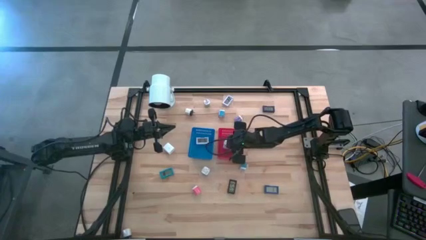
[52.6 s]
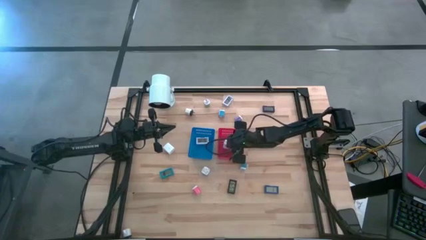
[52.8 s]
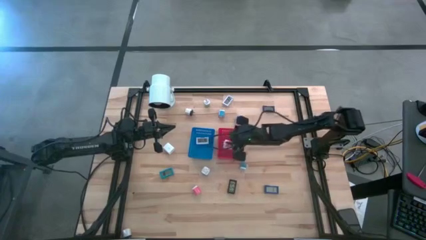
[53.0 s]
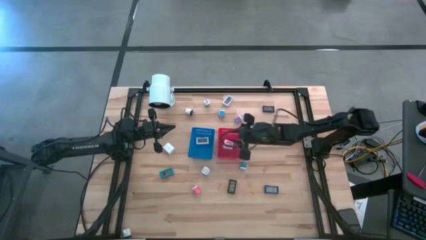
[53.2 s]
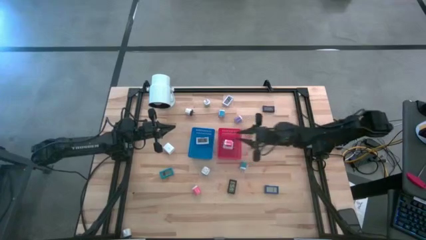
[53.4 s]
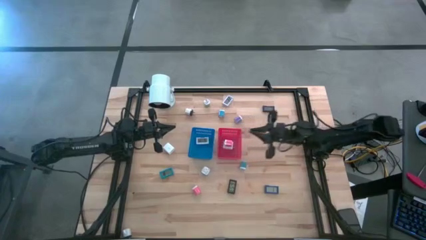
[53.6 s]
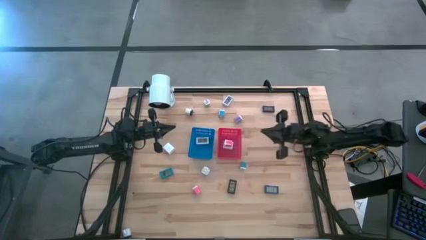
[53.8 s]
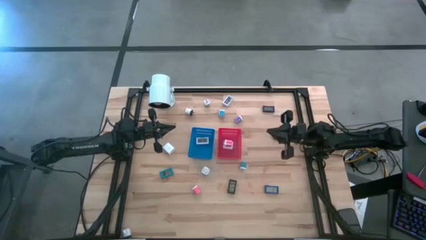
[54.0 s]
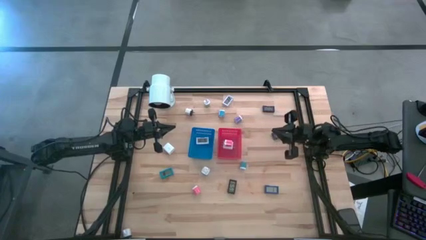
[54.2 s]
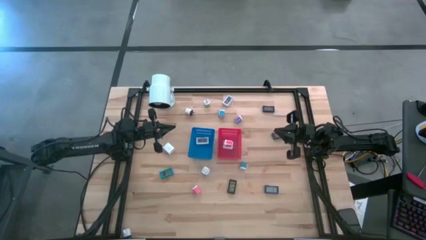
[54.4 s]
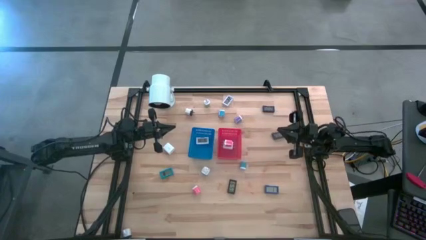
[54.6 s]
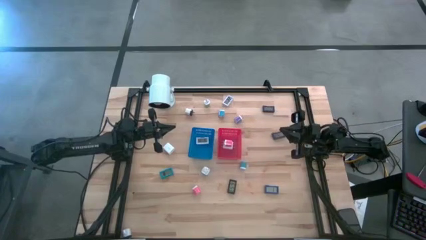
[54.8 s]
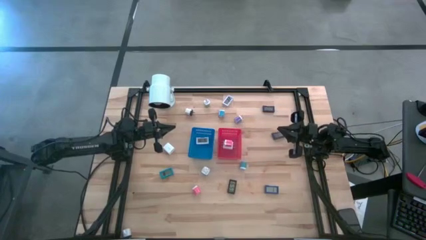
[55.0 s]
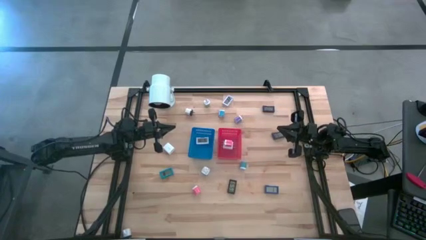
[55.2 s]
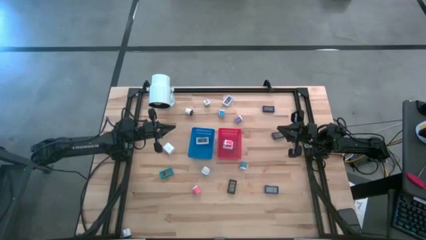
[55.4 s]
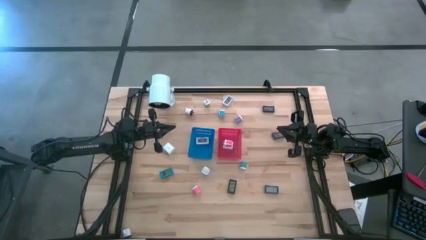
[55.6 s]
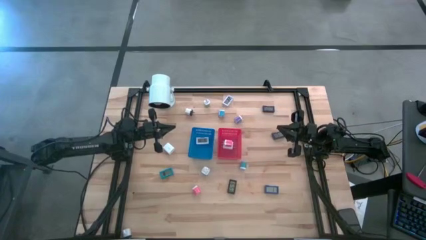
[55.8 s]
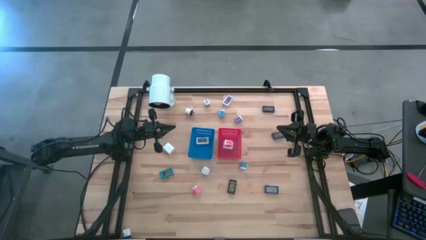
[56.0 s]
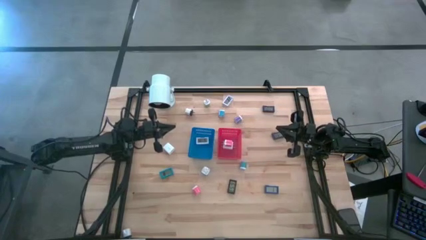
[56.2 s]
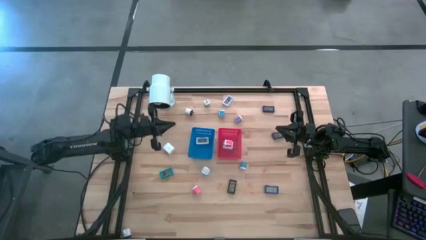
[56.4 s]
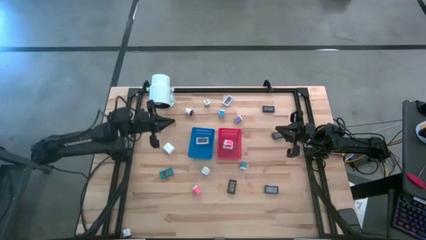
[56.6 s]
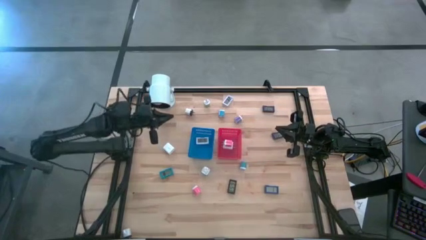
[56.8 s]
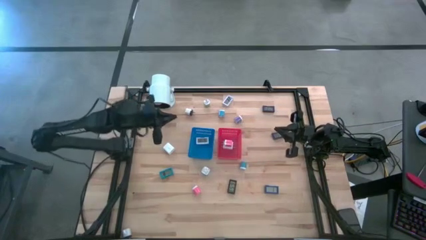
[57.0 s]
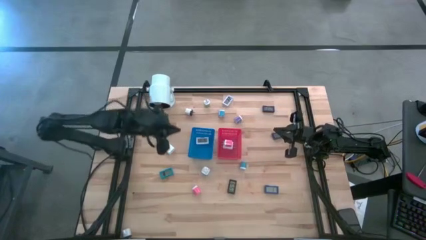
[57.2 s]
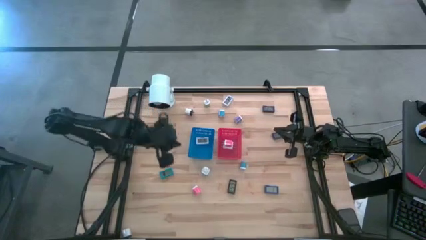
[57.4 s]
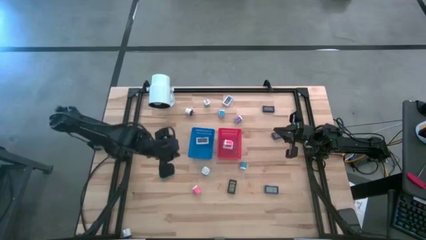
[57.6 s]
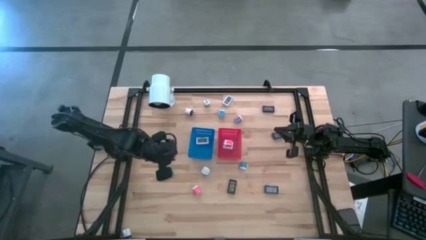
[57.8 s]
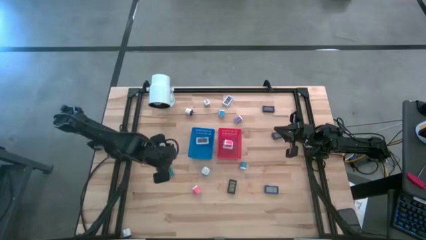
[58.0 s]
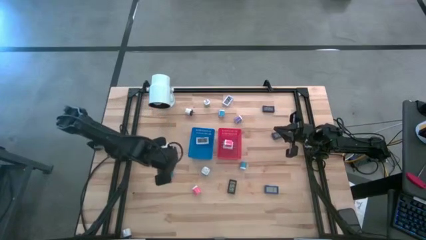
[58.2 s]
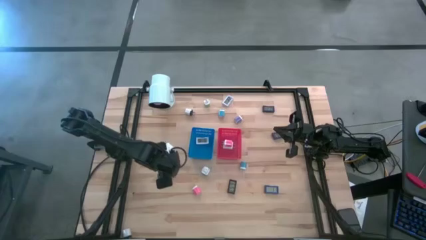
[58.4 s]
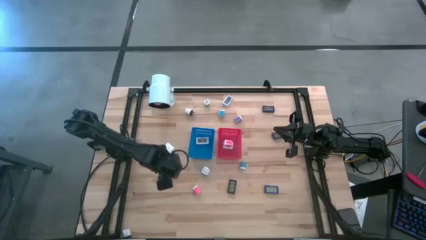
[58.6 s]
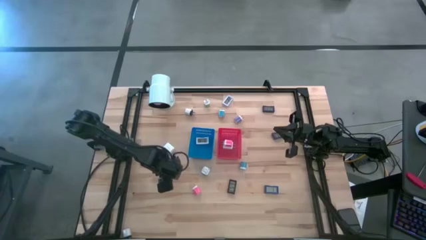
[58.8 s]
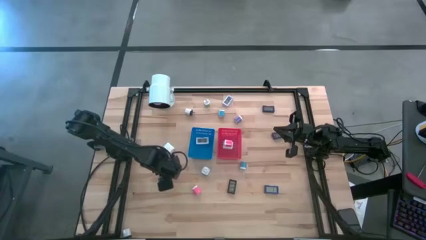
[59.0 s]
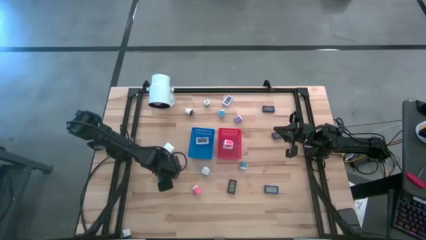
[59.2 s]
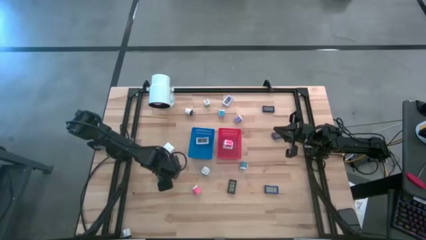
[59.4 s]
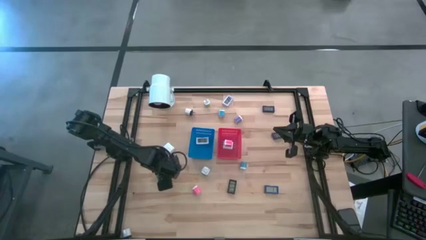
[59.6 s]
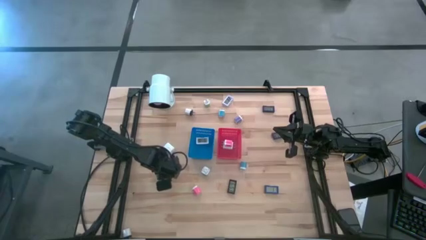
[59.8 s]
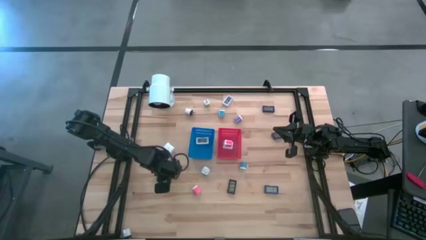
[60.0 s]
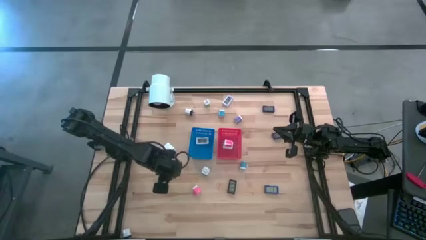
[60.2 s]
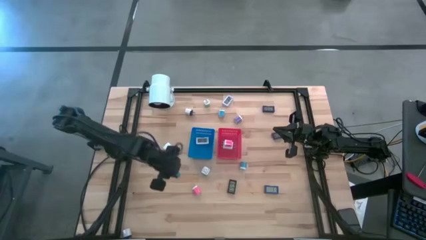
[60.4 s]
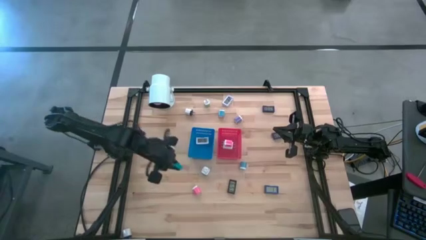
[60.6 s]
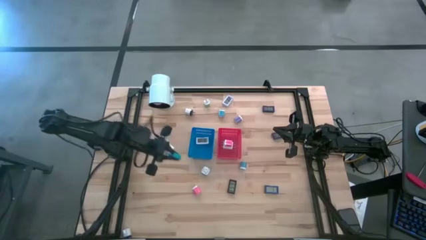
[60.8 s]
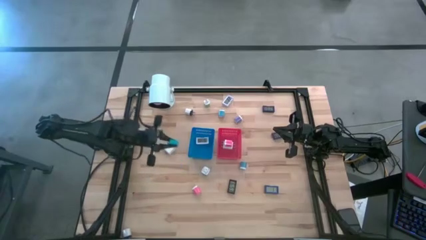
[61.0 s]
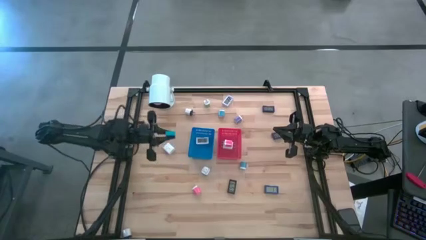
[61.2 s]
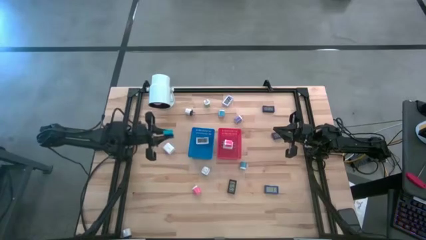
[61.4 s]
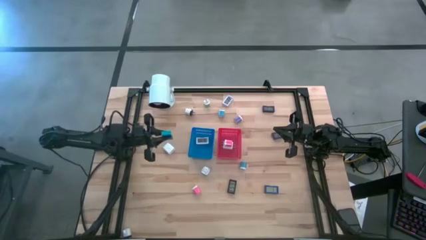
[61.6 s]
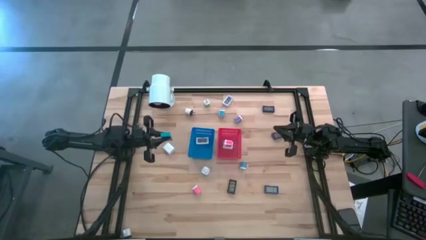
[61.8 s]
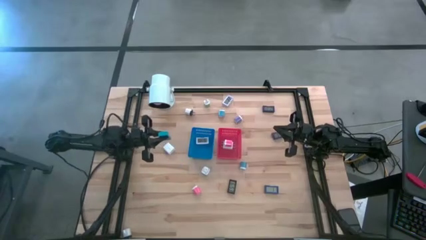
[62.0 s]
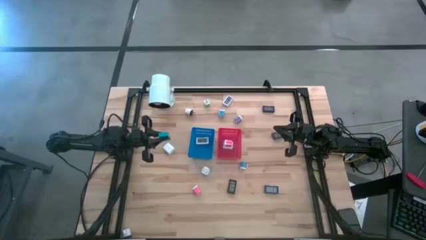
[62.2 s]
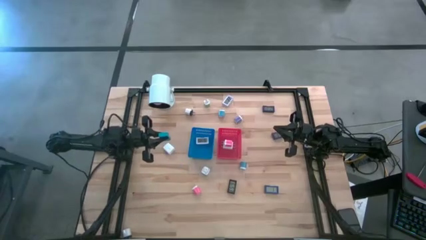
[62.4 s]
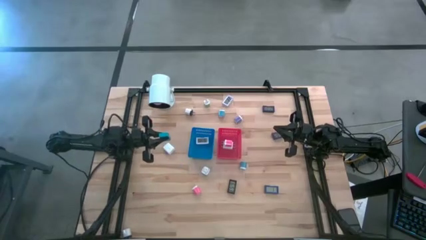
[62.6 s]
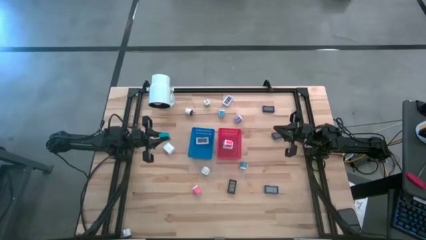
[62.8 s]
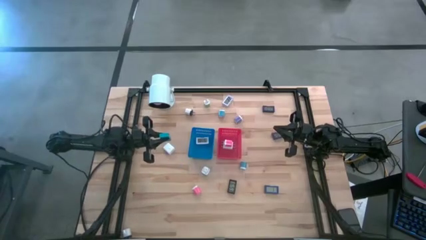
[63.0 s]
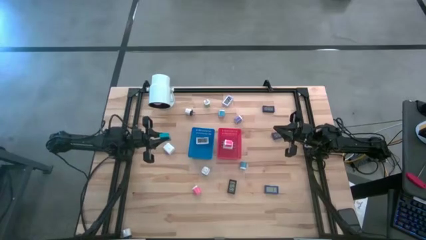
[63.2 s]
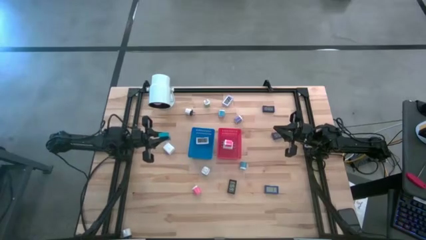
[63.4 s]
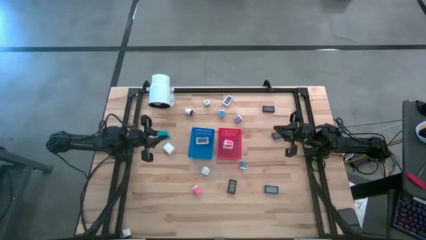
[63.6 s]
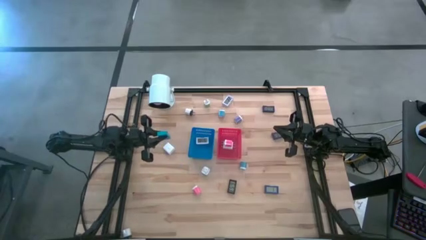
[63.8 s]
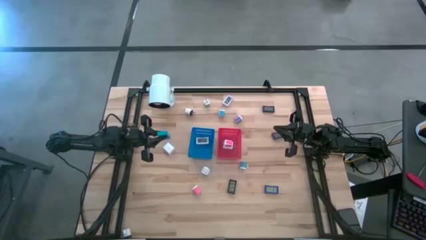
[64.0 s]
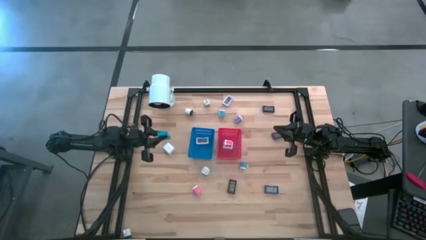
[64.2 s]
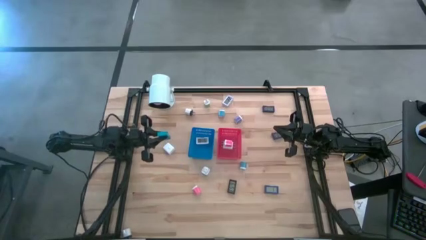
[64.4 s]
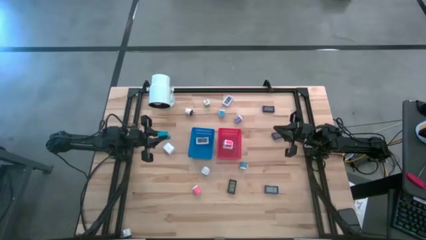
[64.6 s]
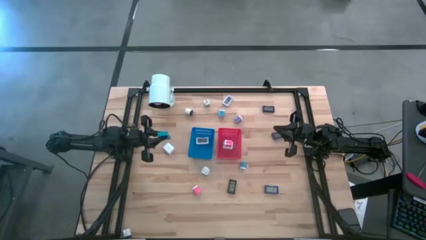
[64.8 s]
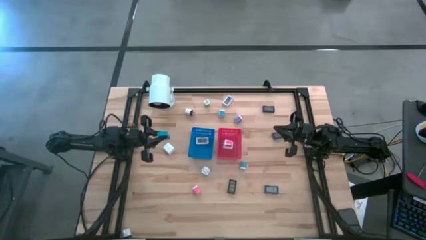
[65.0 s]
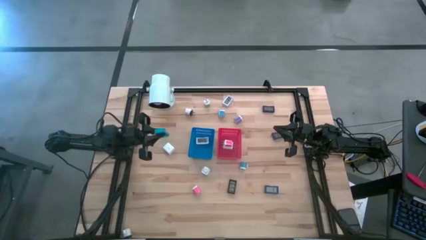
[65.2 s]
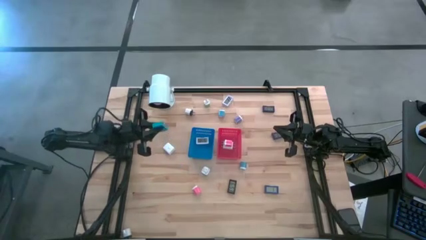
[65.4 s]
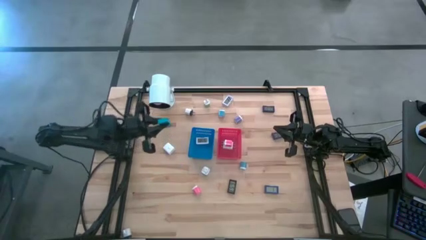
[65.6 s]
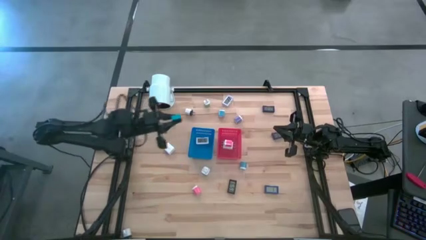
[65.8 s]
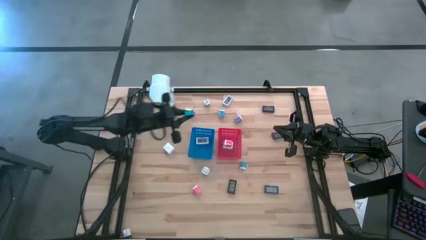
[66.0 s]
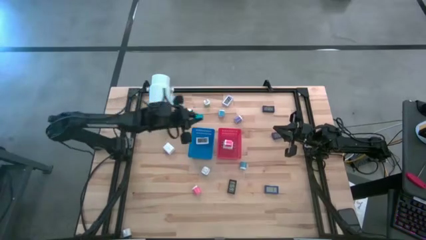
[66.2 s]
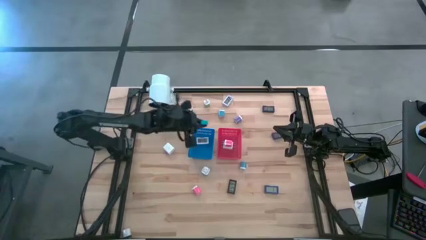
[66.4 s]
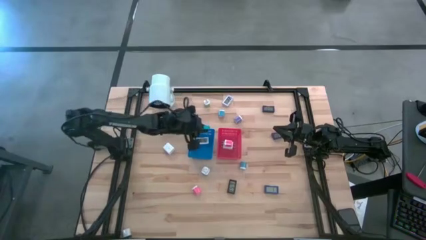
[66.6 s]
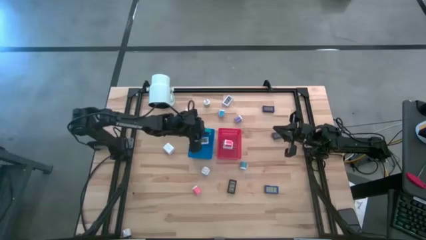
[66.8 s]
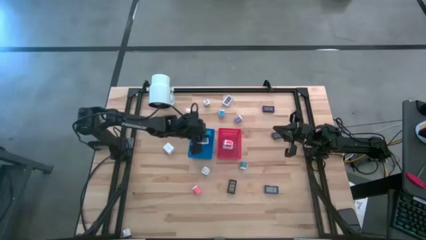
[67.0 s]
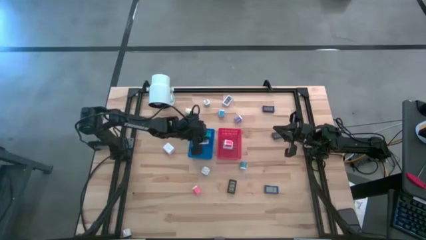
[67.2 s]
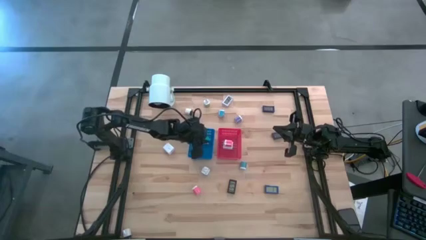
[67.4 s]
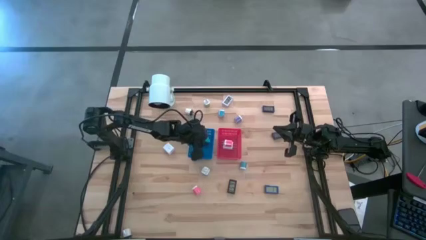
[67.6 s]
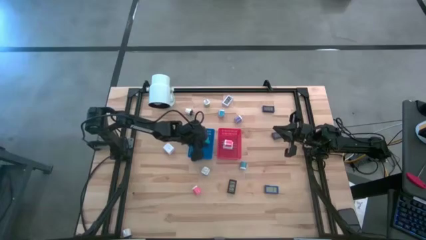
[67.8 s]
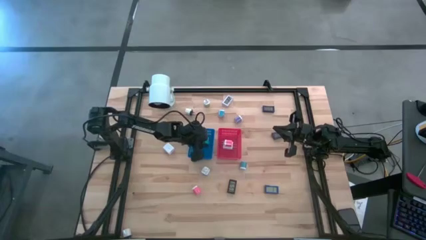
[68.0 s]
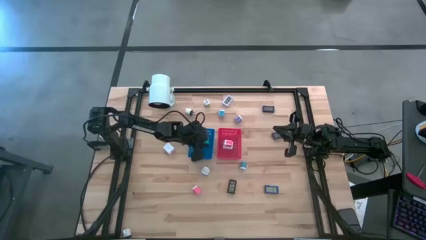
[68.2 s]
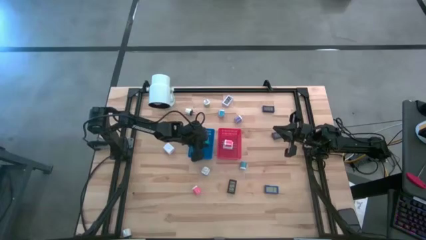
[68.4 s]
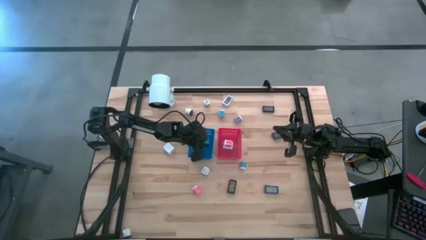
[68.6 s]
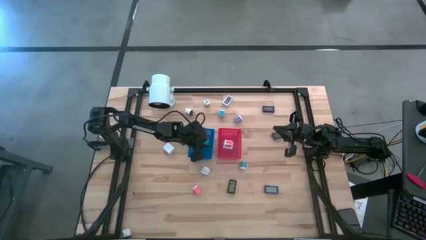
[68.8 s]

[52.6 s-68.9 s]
Task: Pick & Place Office items
Put the blue digital clock into the blue bin
